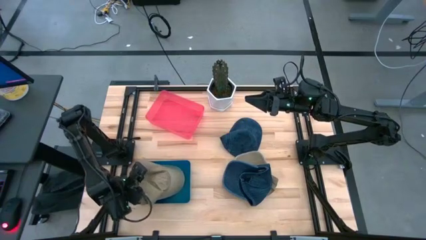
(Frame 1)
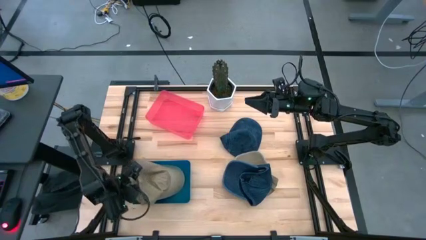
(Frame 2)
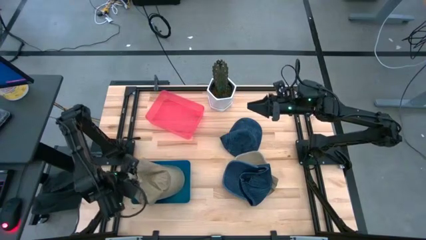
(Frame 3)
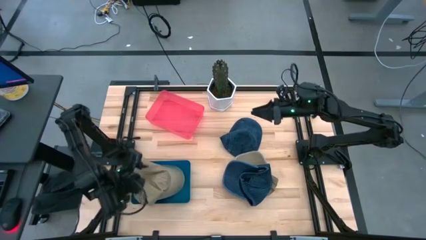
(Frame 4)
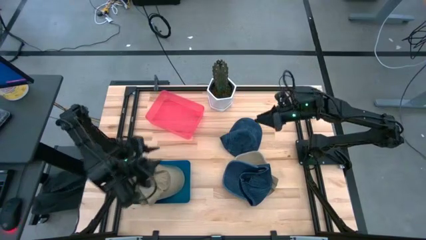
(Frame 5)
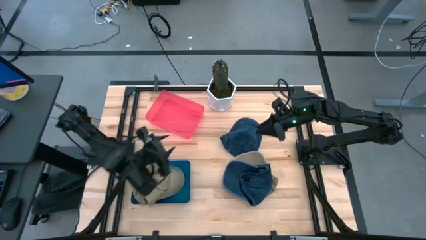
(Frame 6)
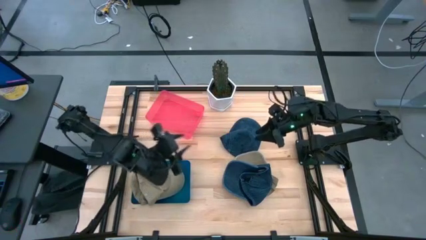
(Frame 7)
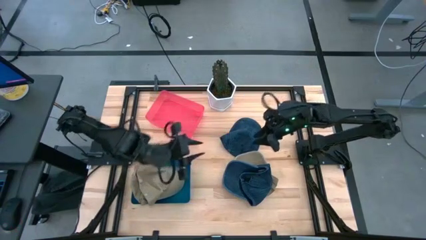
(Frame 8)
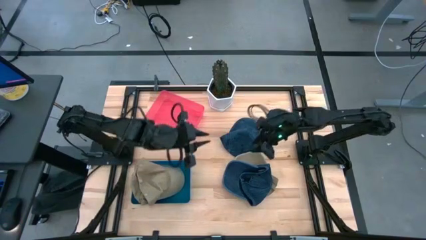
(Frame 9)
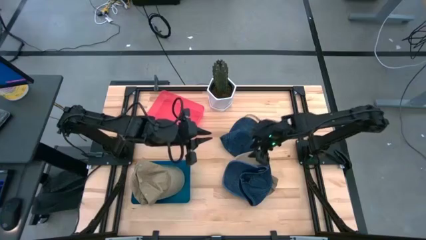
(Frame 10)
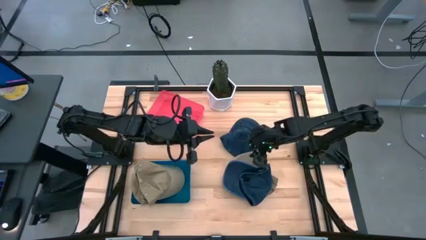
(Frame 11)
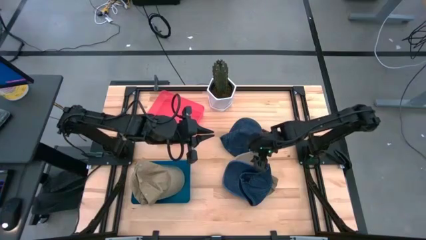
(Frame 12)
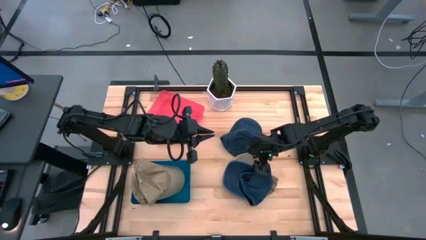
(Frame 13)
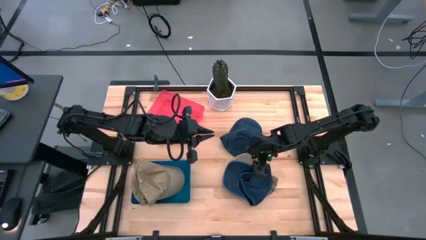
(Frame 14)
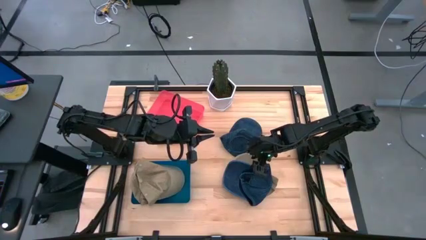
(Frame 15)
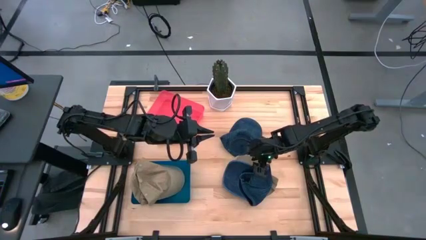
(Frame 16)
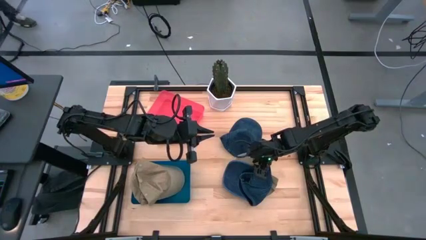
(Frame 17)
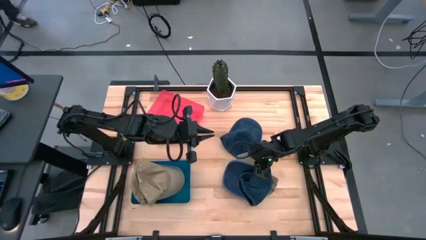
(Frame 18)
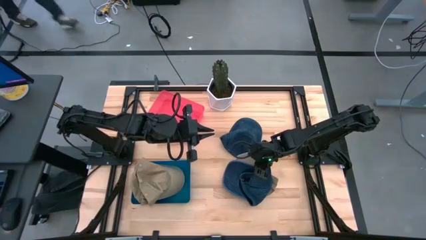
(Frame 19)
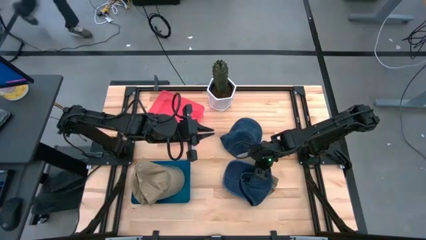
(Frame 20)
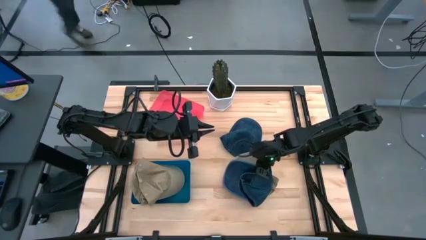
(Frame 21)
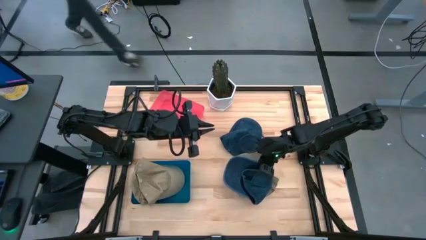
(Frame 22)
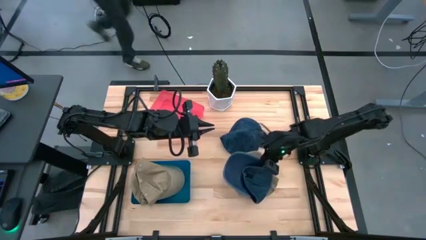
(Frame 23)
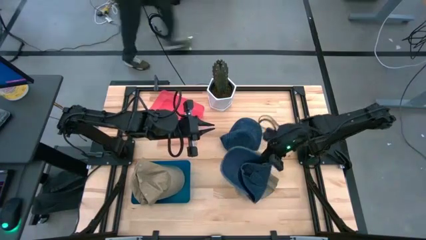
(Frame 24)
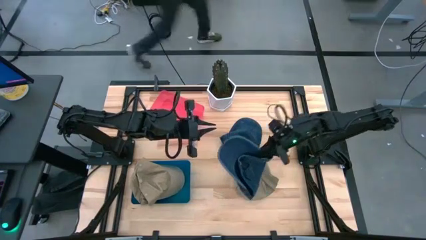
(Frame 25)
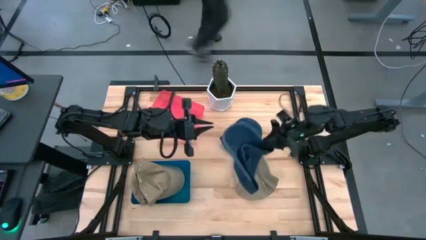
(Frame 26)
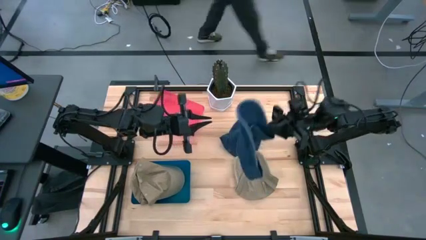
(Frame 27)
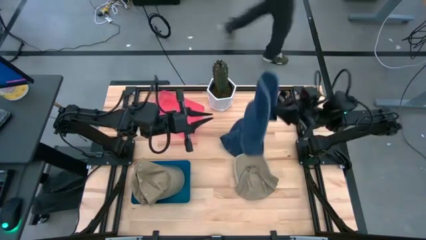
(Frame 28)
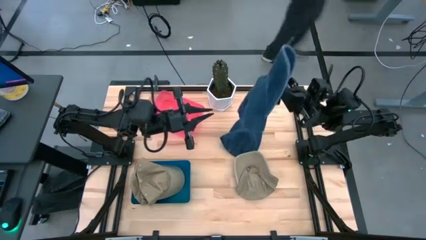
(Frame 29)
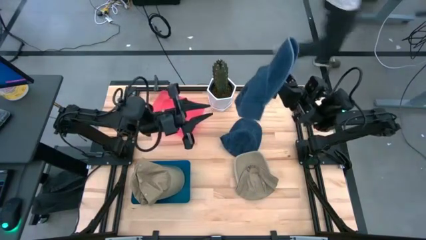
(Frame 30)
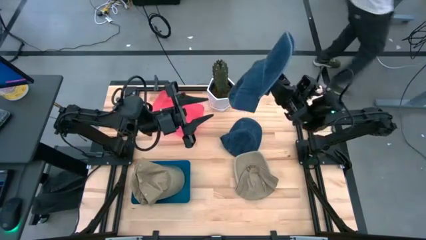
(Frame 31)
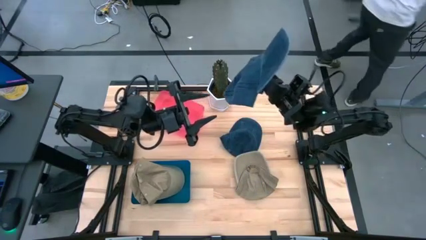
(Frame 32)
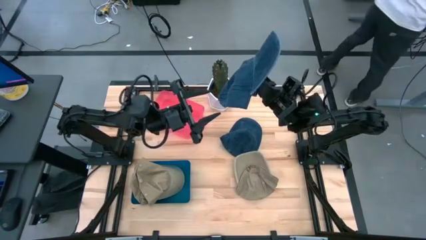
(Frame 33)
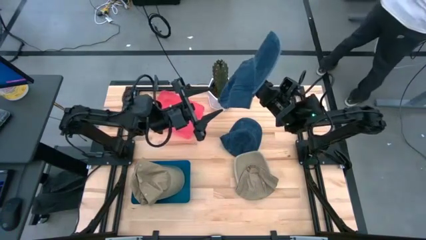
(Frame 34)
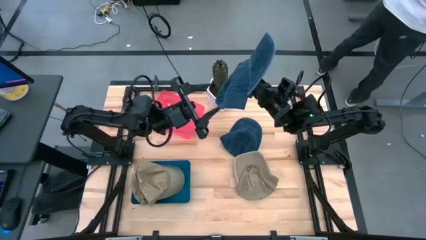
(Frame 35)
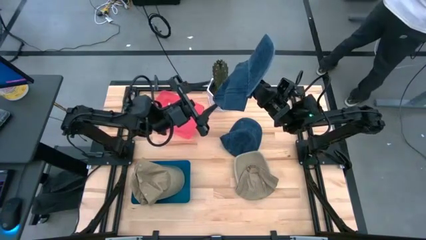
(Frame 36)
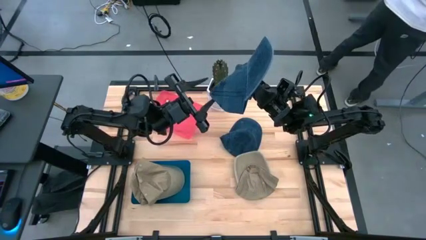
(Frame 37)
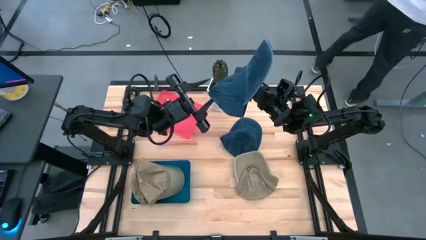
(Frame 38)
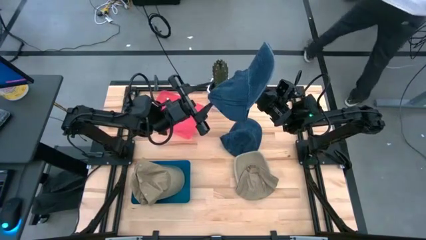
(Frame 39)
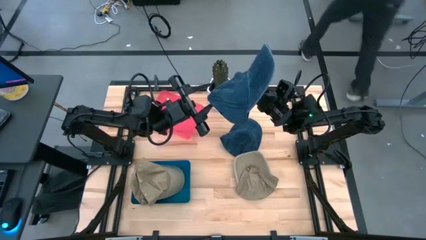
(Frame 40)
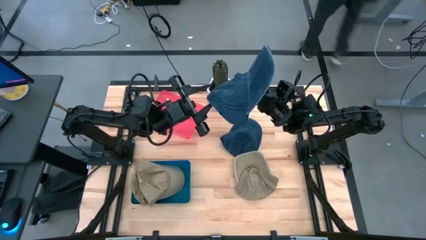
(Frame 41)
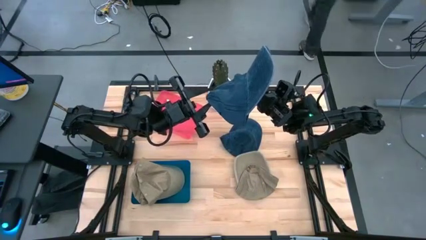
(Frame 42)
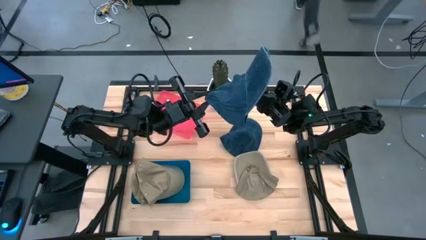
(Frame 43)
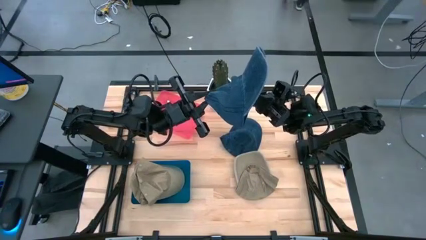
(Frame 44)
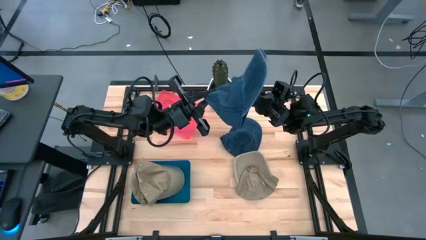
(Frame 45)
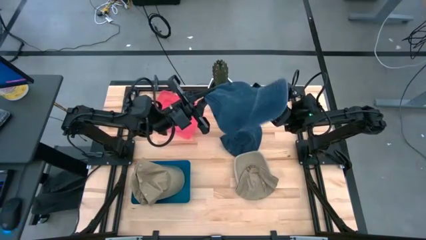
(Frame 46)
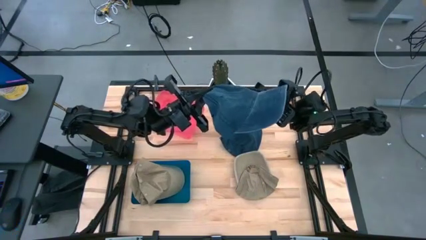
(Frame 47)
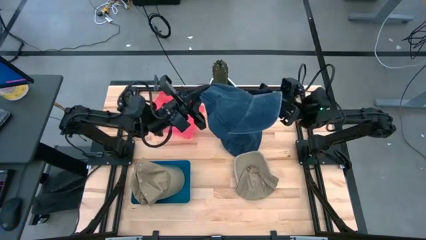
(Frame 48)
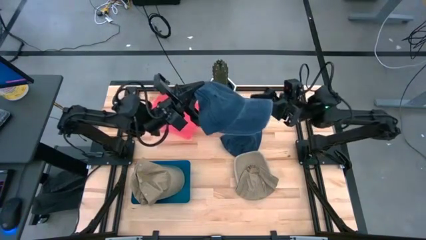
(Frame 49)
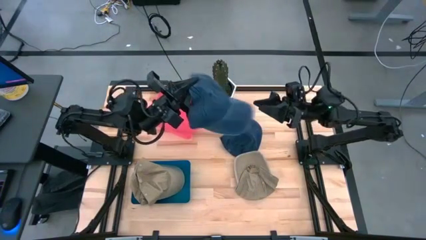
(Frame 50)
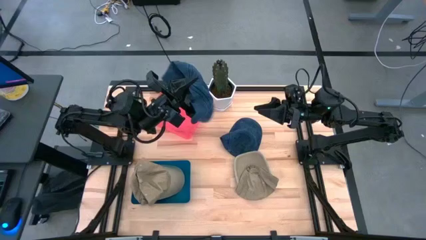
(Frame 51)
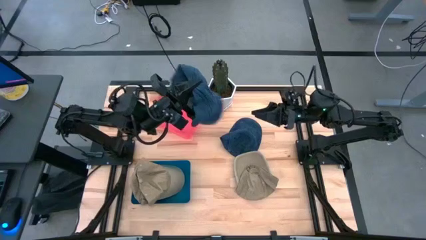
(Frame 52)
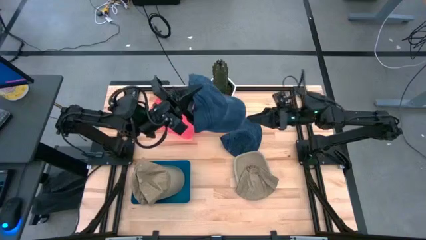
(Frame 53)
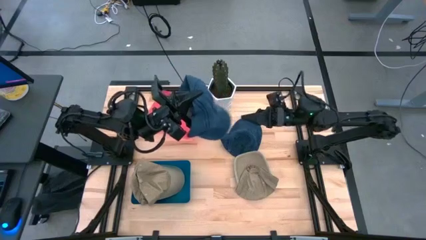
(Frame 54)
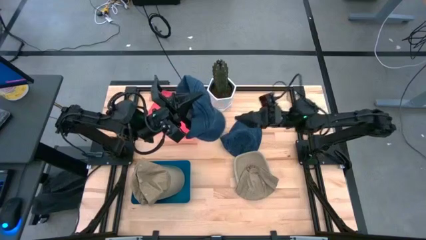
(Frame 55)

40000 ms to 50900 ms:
Task: Pick & Place hat
Put the bottom blue cap into the red bin
